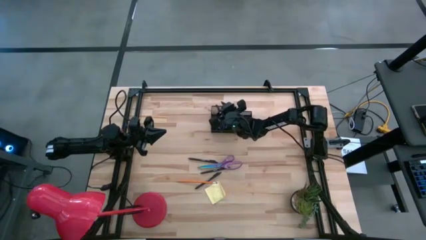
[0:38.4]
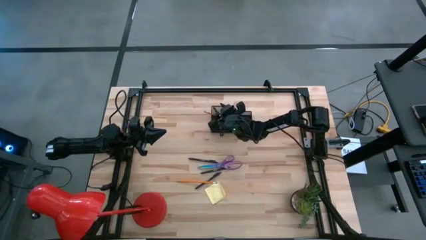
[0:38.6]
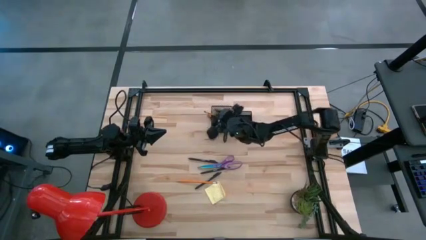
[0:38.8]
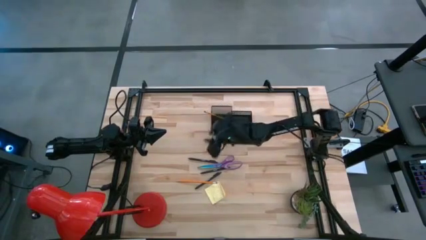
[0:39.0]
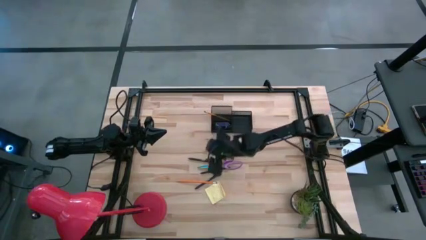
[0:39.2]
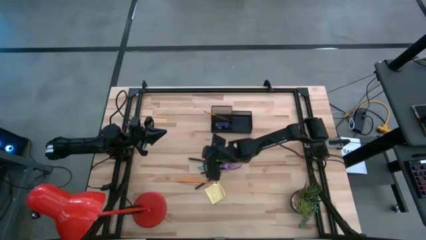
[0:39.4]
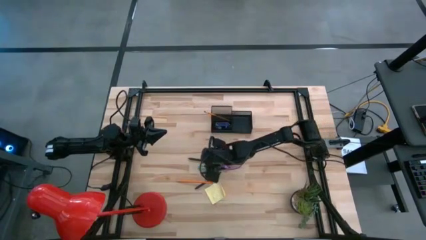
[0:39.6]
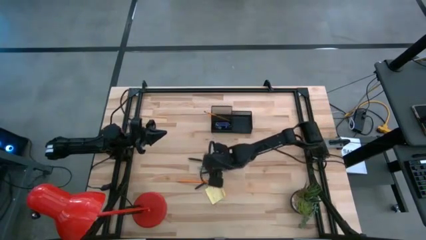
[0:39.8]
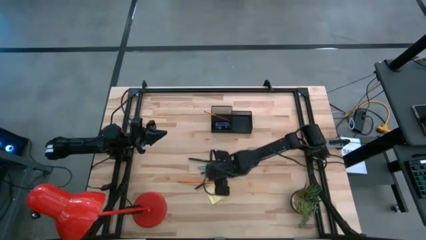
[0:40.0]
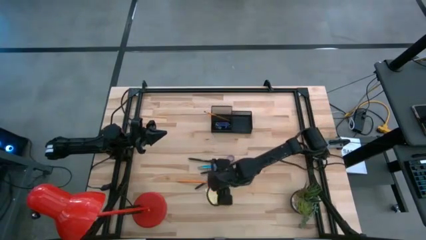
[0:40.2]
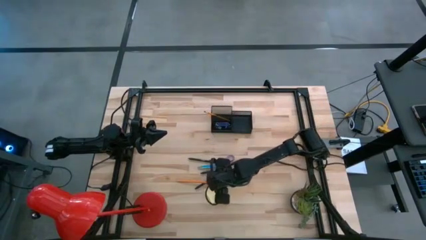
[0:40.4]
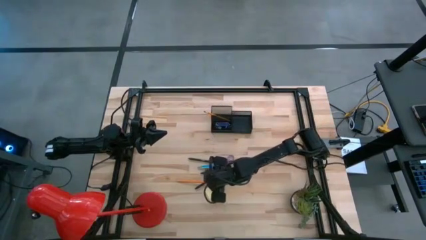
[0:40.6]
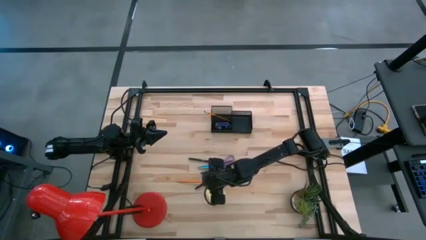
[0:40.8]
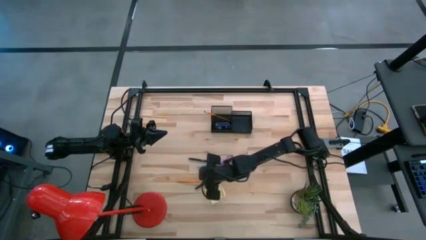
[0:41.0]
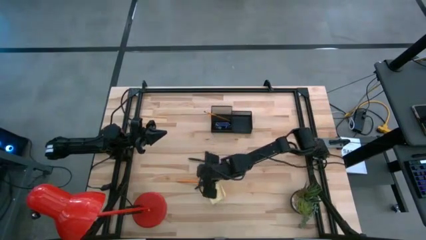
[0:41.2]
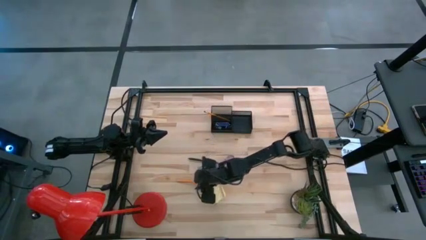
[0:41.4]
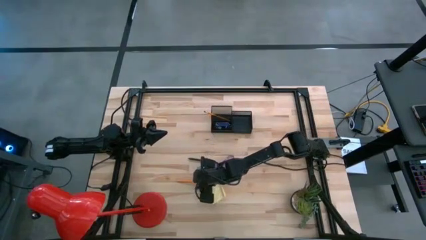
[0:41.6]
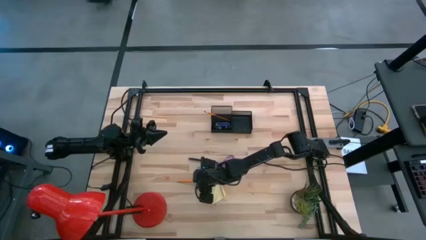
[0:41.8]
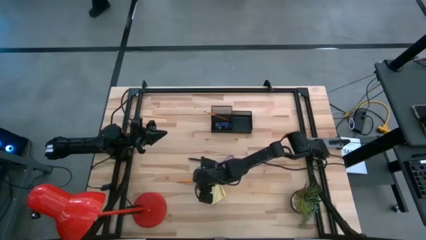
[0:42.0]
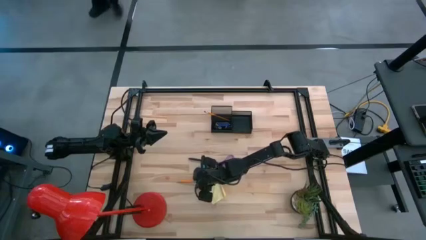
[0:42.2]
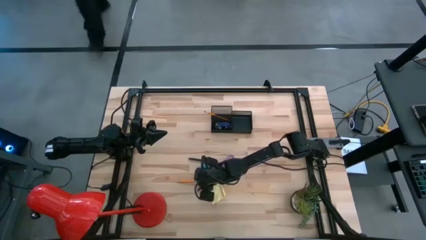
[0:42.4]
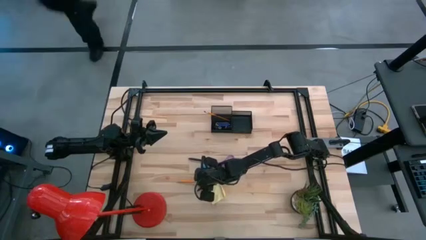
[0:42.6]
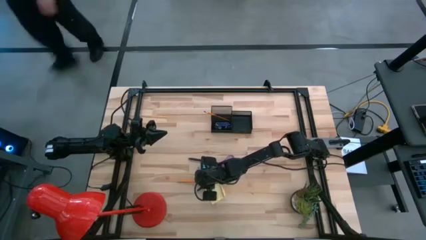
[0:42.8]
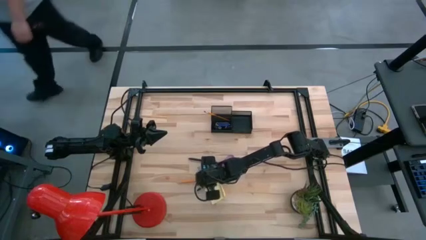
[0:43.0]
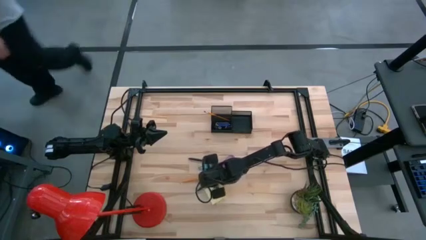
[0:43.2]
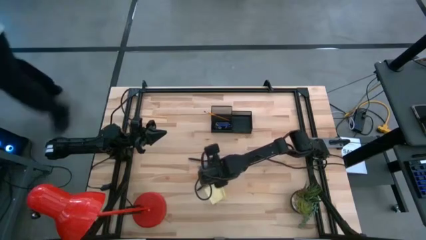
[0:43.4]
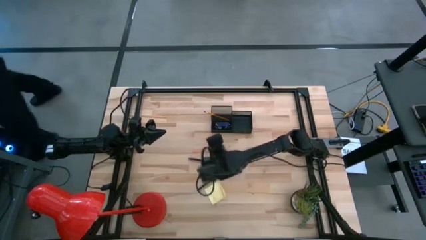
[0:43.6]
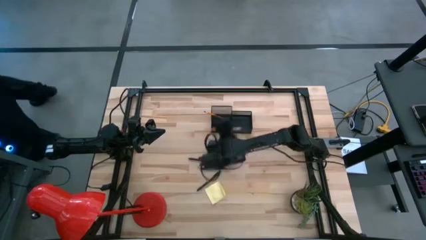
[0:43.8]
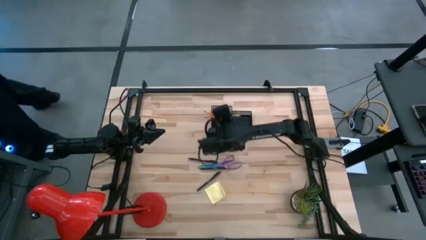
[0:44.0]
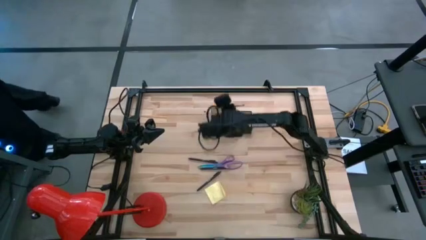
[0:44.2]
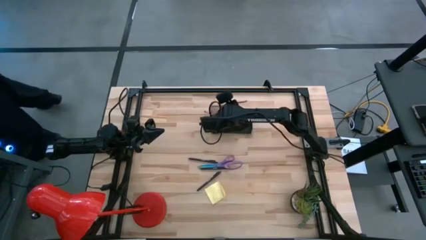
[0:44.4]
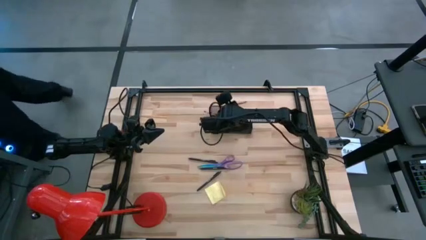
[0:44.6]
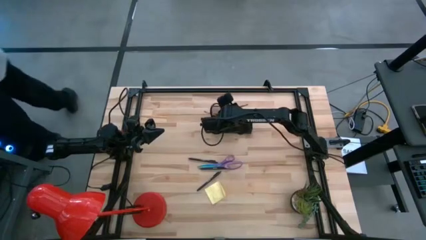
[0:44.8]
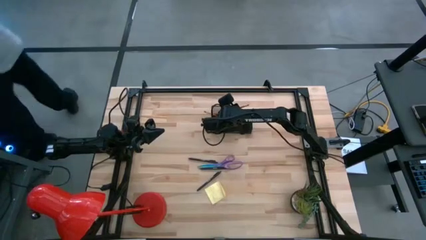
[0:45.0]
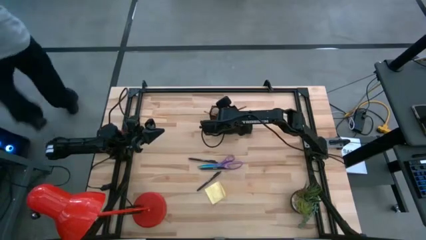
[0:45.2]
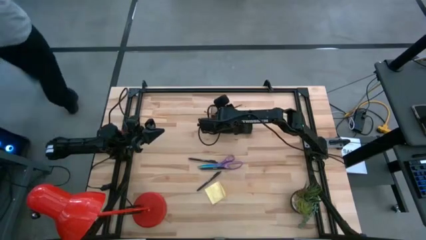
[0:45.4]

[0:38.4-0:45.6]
Task: Pick and place office supplies into organizer
Put the orange pencil into the desk organizer

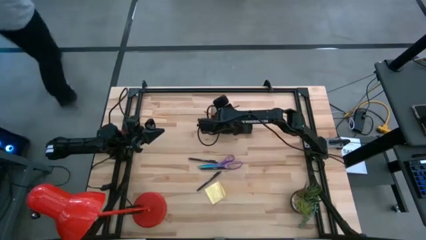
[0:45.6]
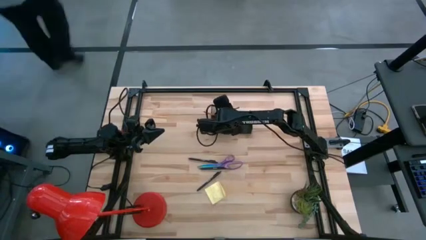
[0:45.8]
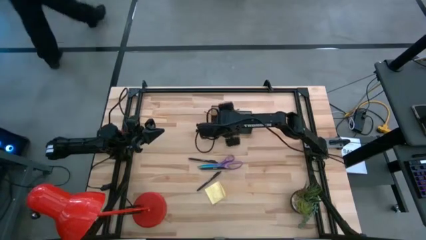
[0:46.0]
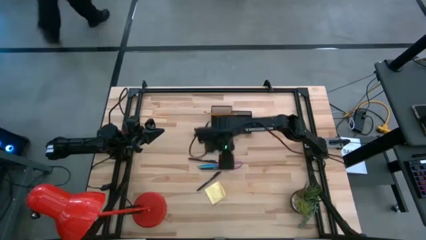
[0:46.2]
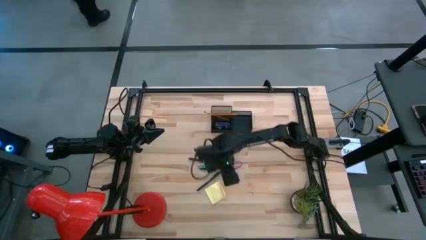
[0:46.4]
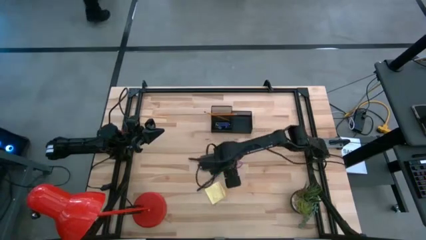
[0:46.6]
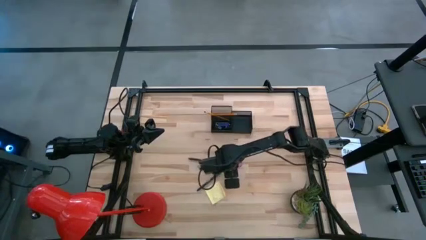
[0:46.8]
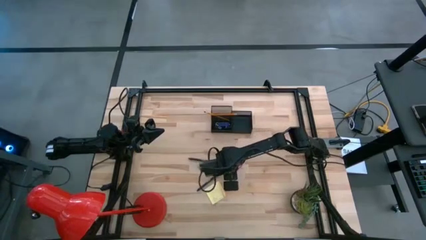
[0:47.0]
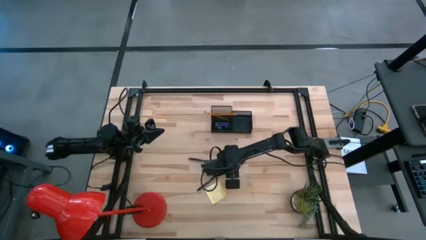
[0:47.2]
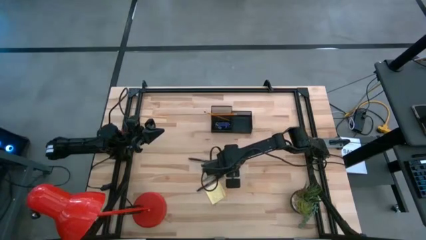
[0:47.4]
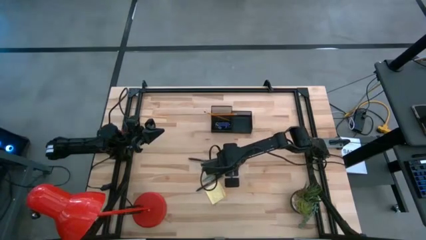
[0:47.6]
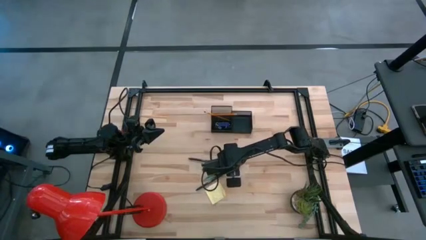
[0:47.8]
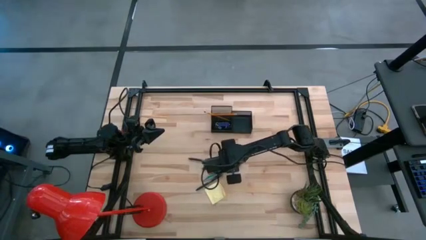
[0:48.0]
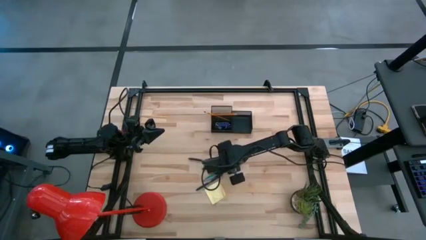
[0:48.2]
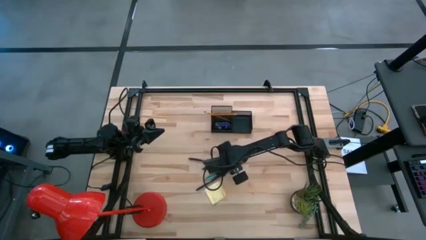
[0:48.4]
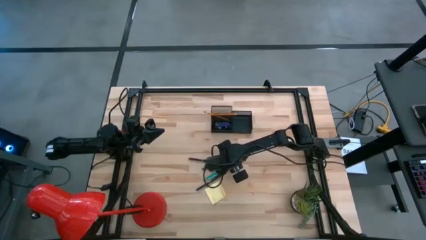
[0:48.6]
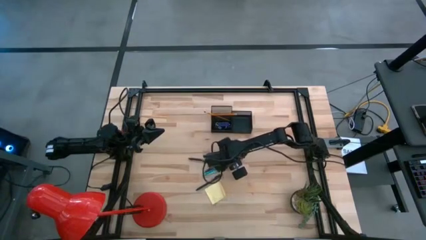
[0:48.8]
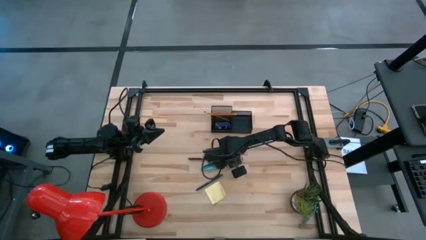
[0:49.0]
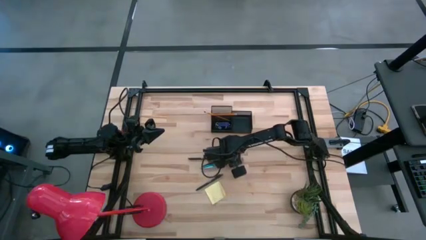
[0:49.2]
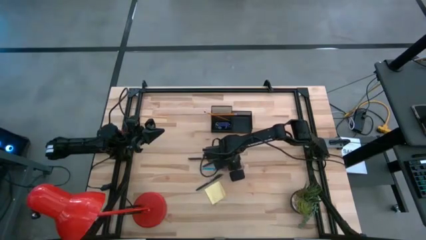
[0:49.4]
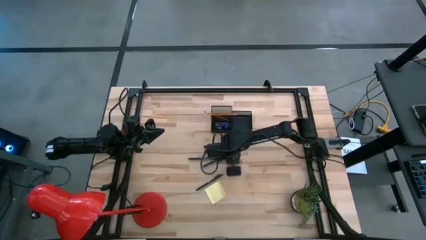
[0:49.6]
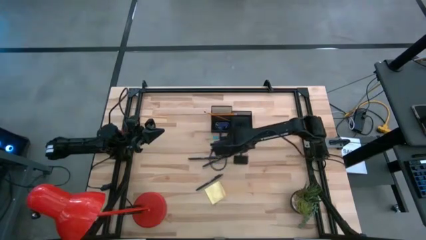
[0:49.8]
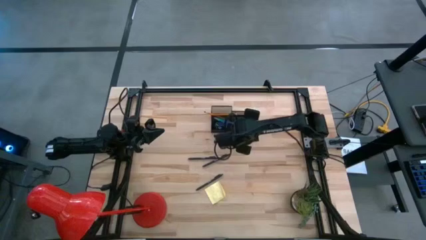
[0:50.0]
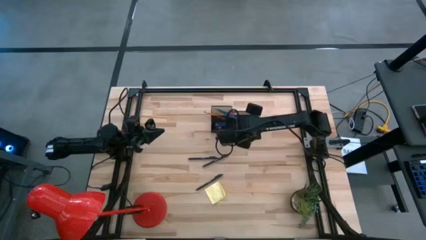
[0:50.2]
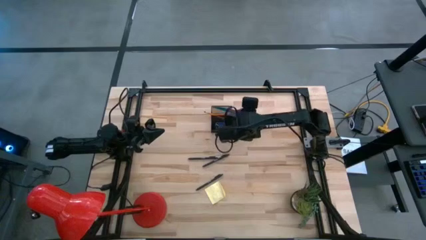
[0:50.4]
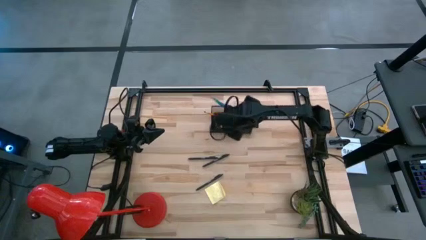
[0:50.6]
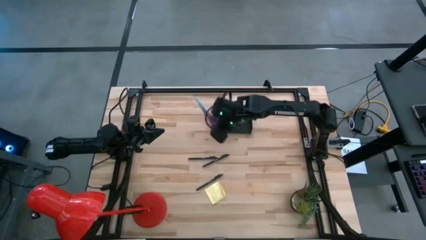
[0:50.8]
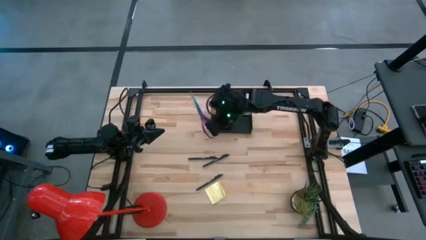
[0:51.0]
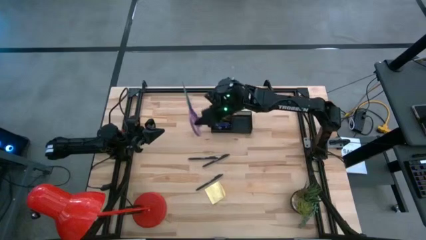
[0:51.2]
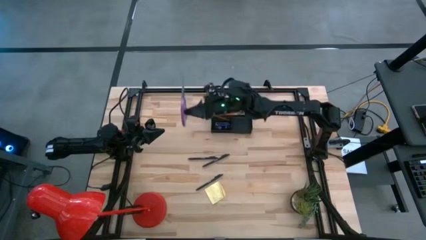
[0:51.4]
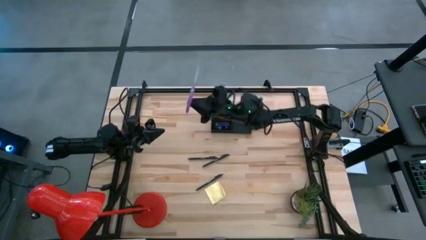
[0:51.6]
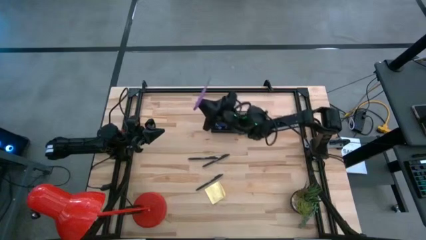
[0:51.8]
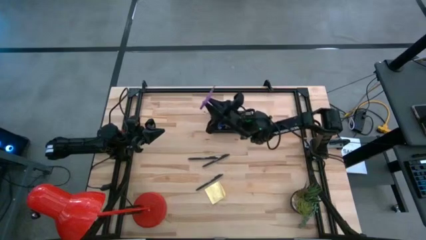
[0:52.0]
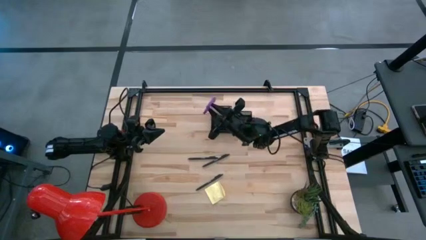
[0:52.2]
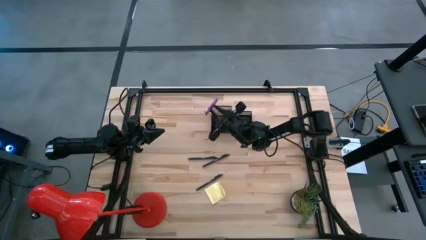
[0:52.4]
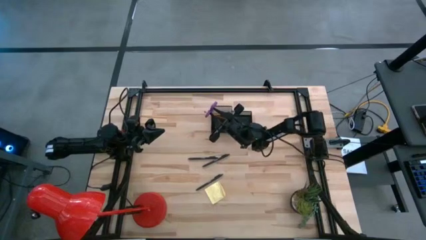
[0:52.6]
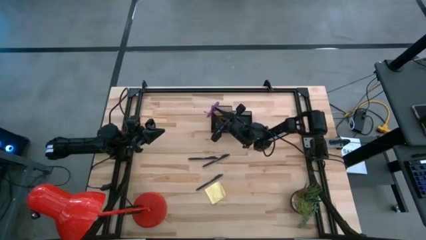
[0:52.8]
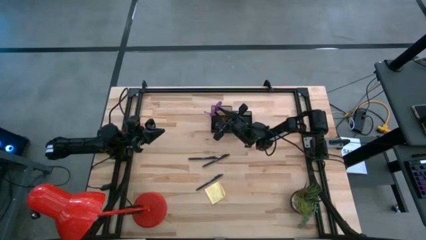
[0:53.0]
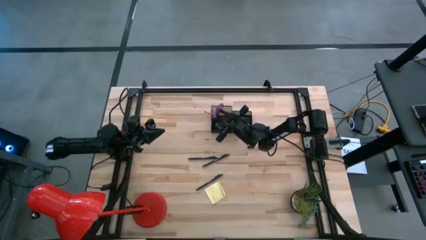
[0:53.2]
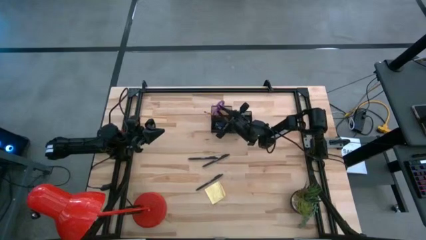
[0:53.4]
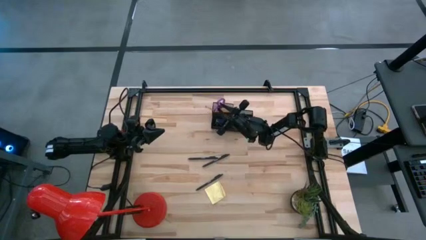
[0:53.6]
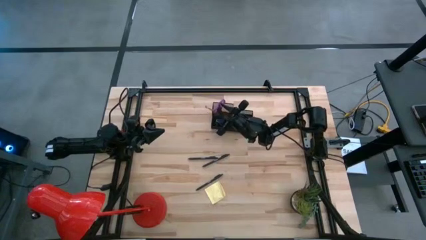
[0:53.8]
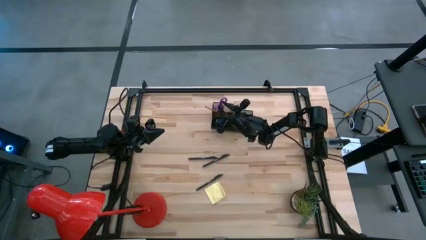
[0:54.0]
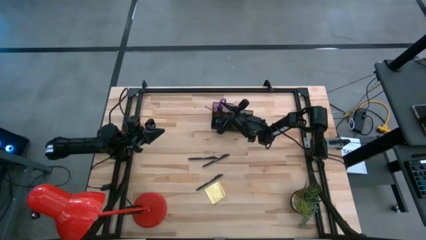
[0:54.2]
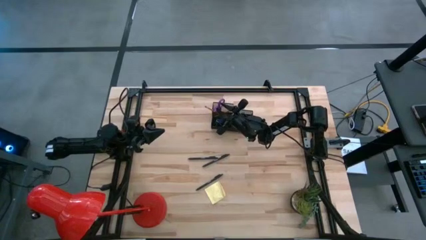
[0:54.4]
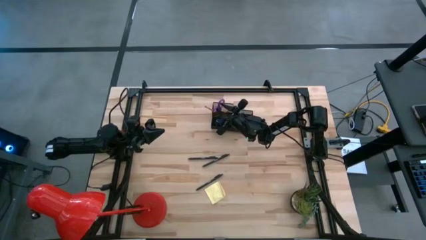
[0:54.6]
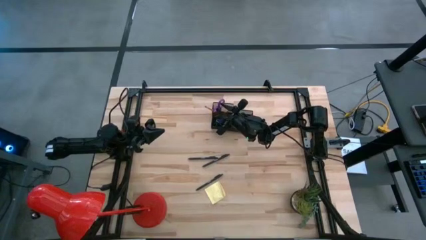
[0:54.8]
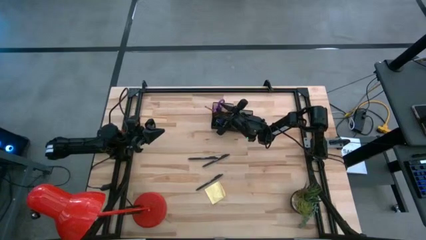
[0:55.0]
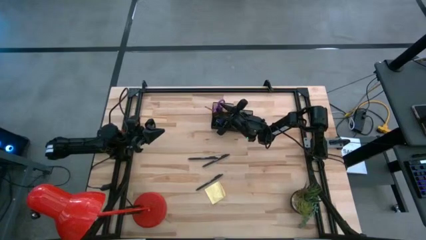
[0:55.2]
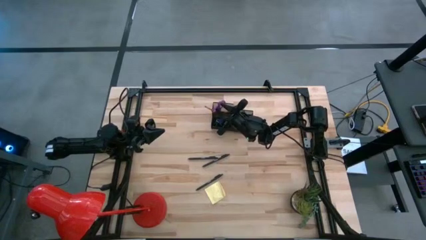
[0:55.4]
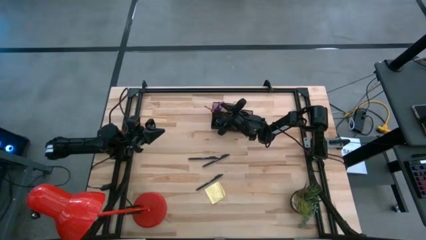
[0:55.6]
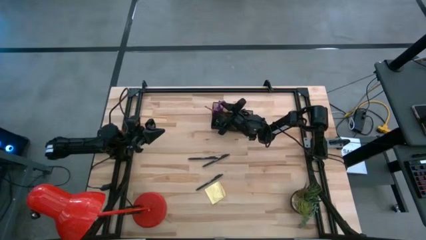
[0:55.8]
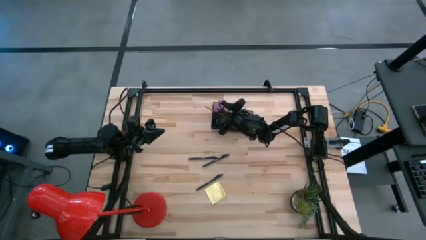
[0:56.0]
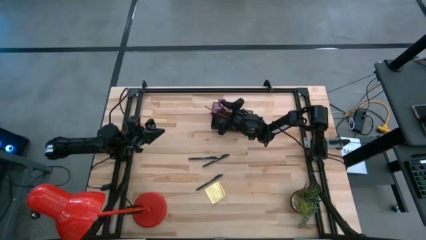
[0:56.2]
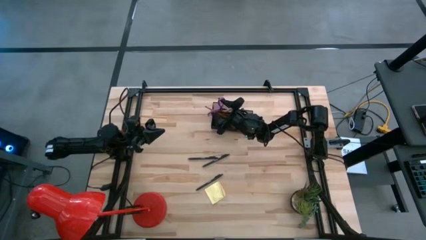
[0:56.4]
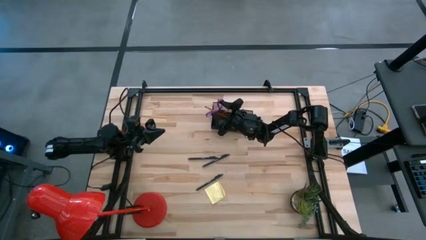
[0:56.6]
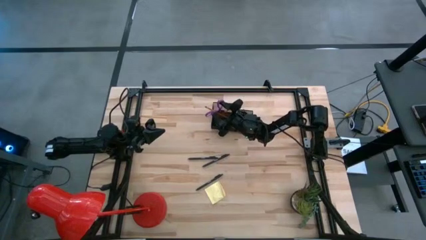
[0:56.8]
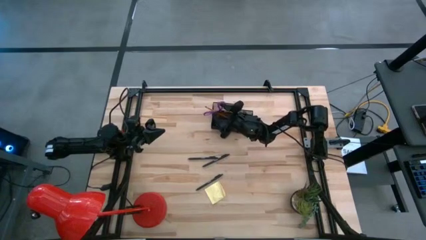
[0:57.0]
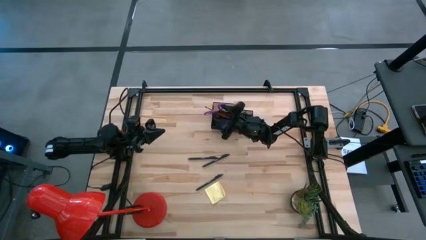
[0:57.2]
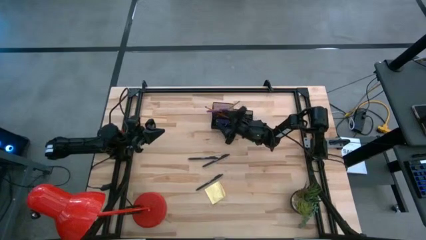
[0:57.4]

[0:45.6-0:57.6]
Put the purple scissors into the desk organizer
